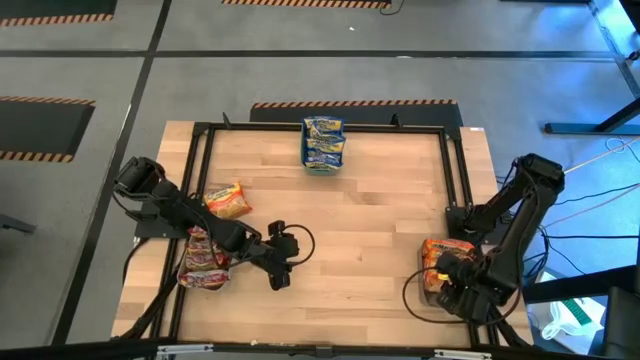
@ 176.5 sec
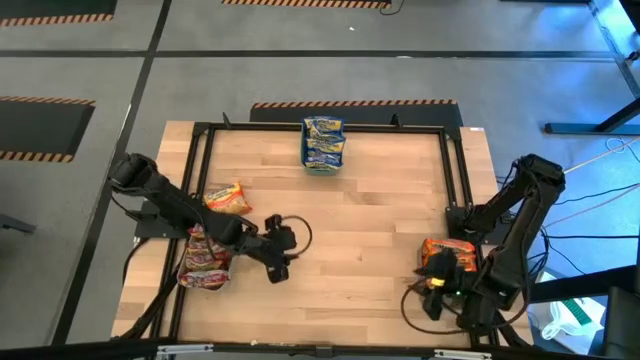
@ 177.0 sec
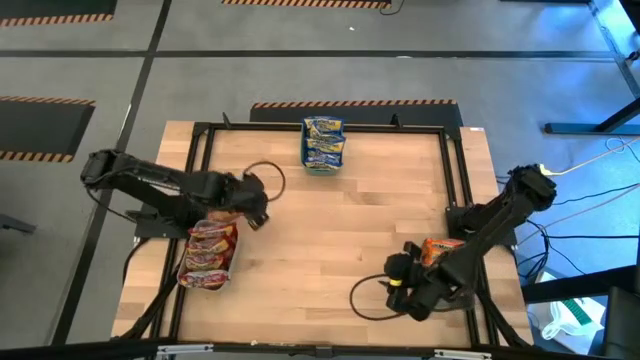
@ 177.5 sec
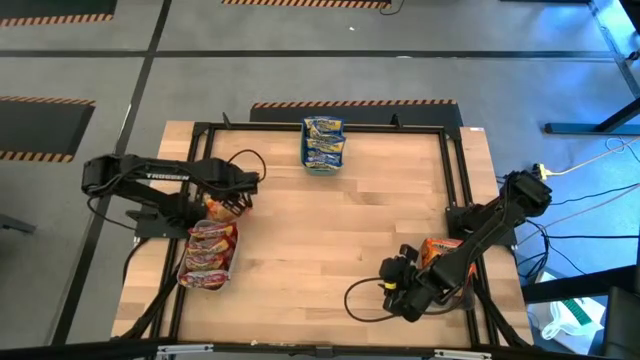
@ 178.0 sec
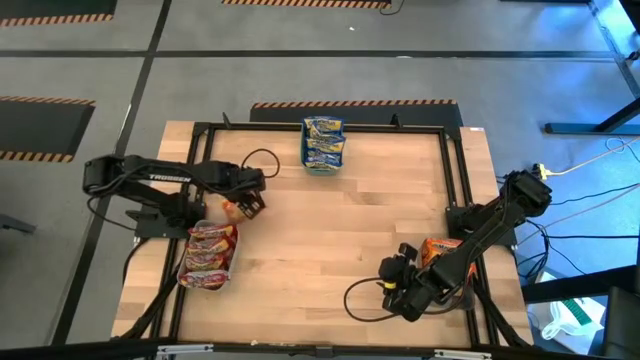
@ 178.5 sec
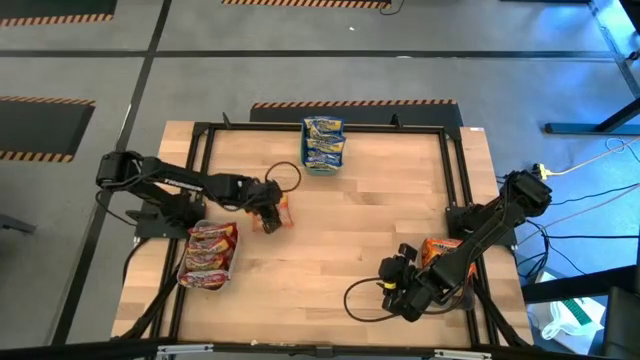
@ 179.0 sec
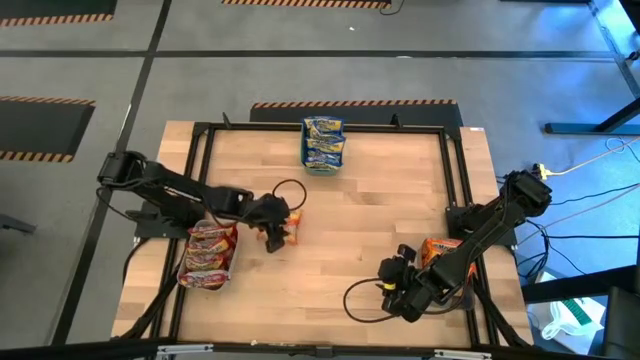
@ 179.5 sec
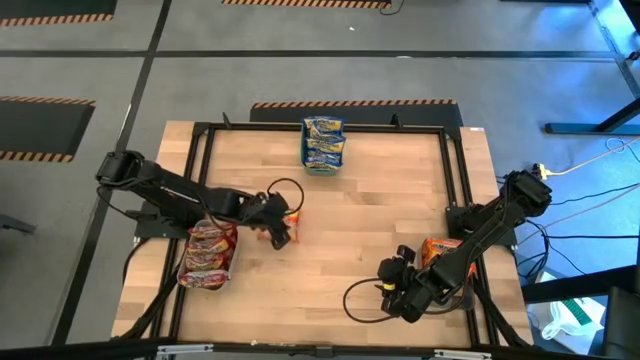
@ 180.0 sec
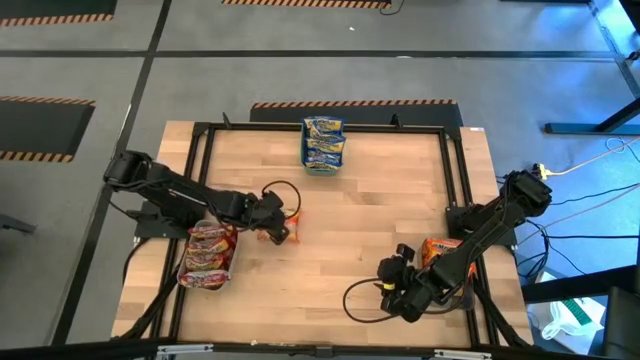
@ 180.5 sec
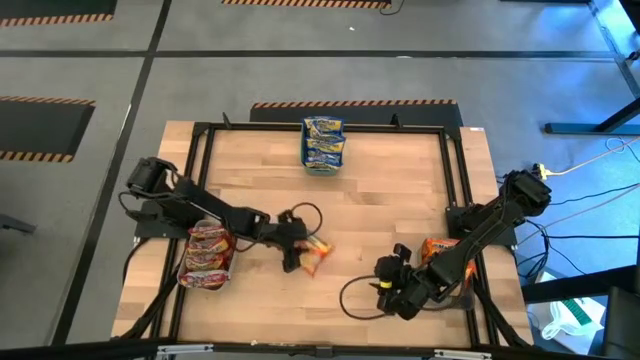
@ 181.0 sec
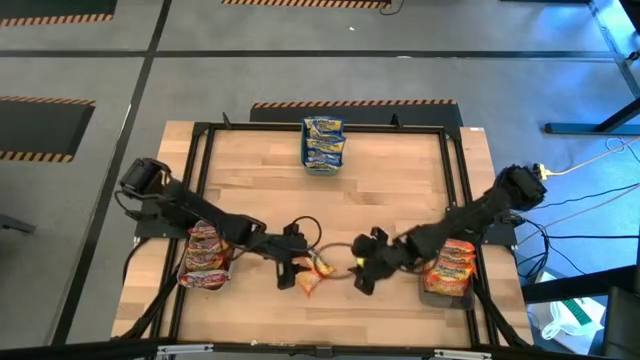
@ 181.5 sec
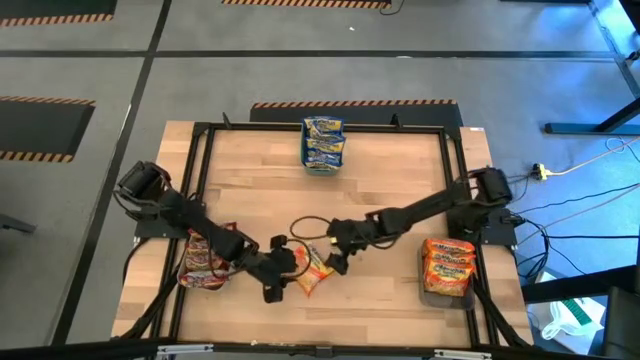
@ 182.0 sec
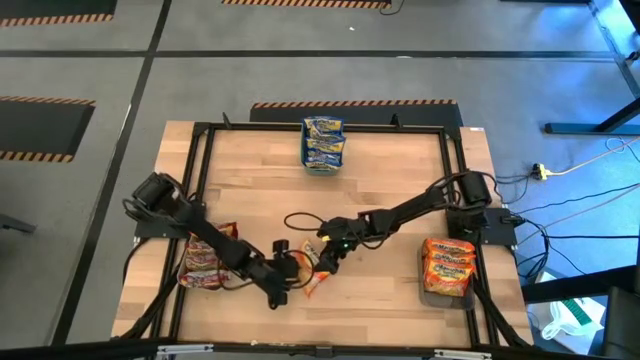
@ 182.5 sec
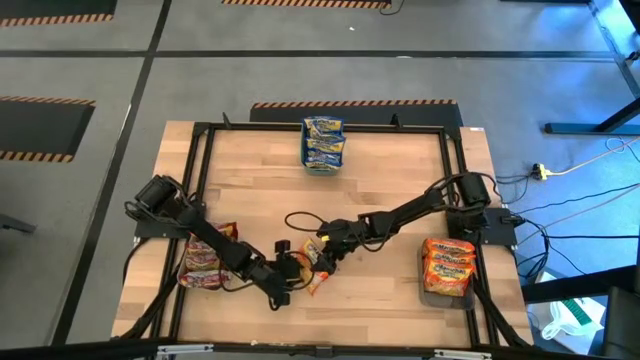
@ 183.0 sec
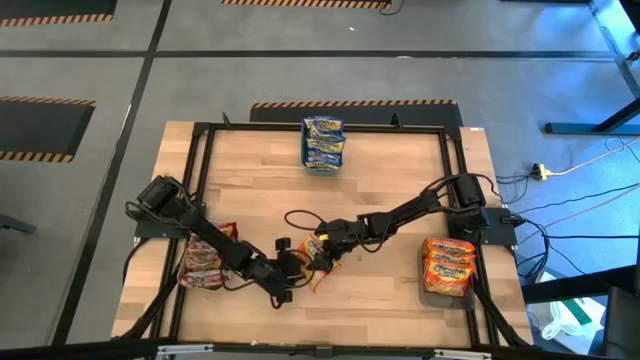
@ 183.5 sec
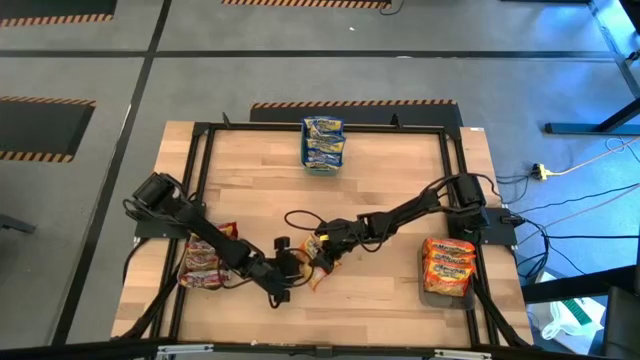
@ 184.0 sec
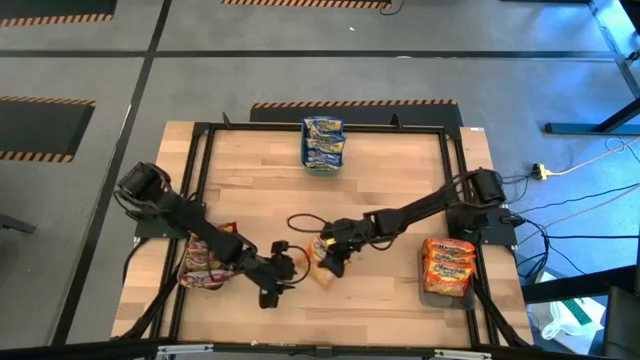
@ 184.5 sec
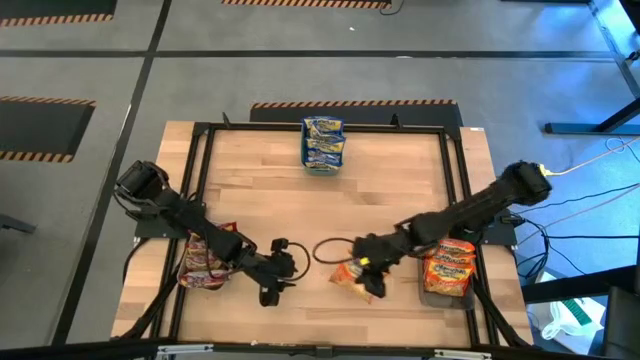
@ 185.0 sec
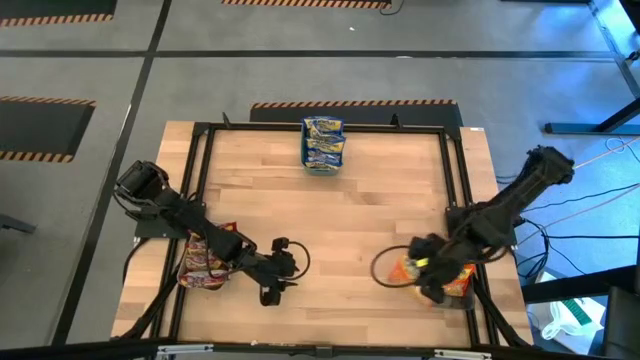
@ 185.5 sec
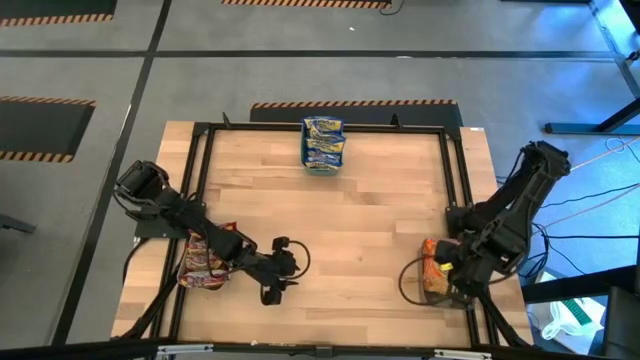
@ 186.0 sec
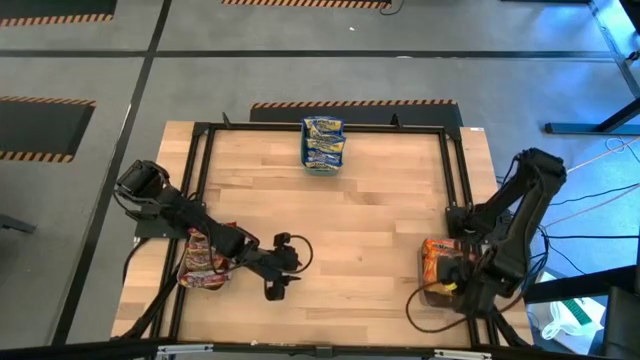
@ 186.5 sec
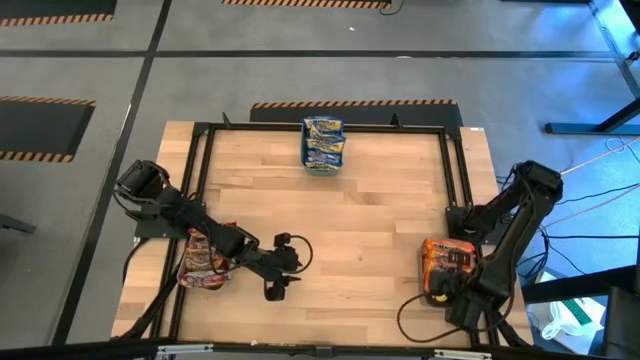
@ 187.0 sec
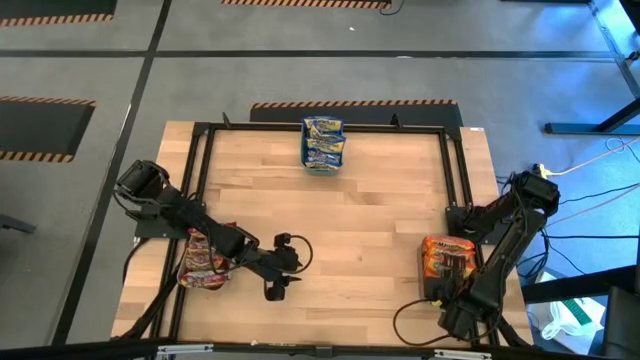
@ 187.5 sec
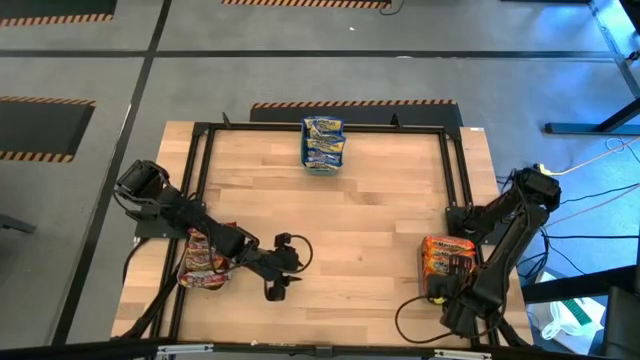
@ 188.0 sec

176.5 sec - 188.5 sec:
Task: Sort Maruchan noodles
Put the orange noodle pack into the black bin

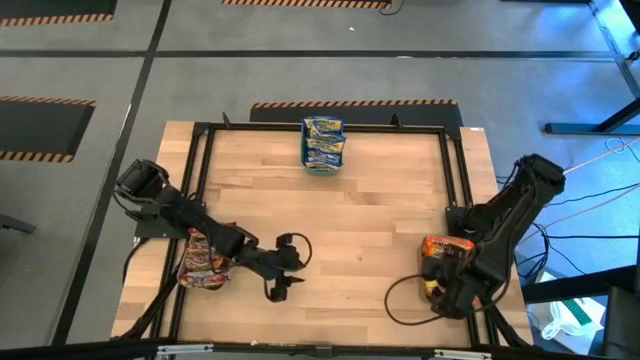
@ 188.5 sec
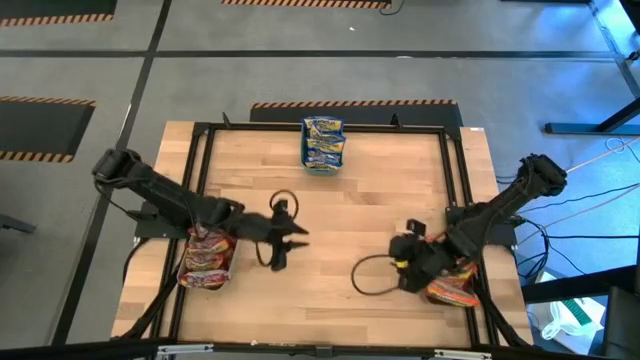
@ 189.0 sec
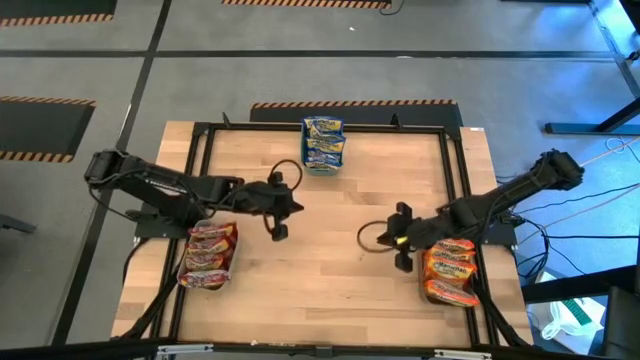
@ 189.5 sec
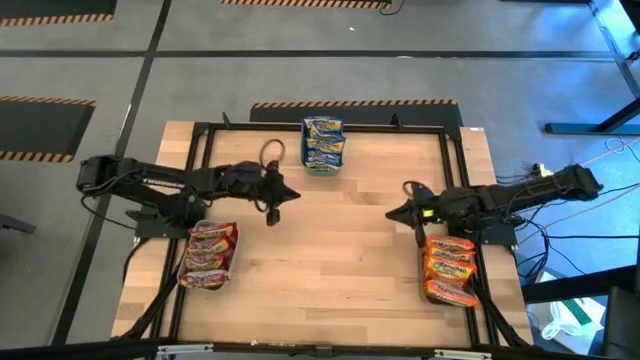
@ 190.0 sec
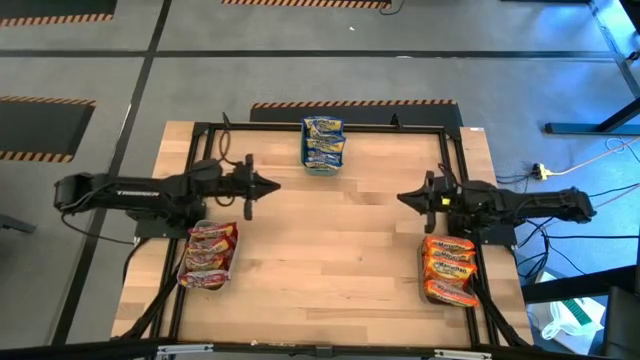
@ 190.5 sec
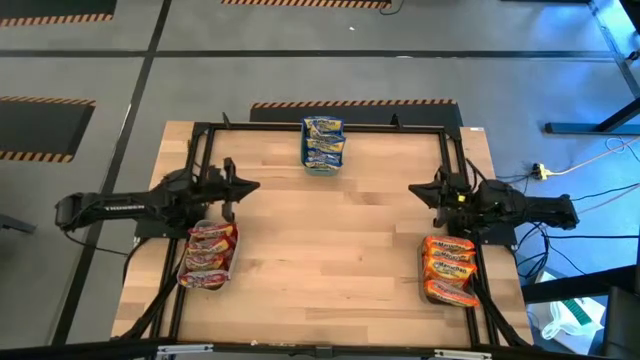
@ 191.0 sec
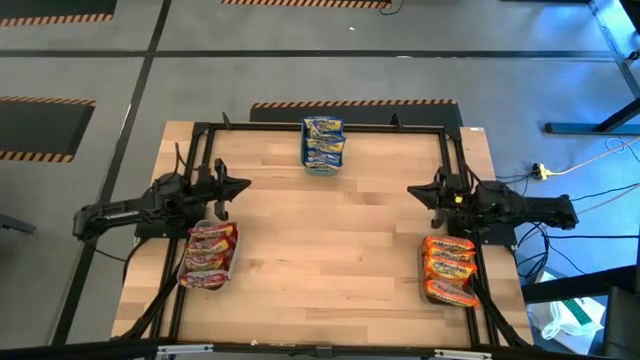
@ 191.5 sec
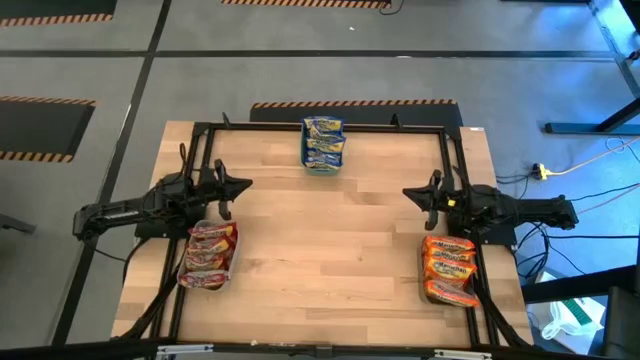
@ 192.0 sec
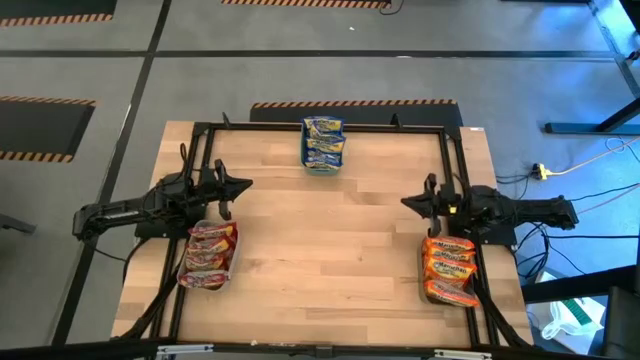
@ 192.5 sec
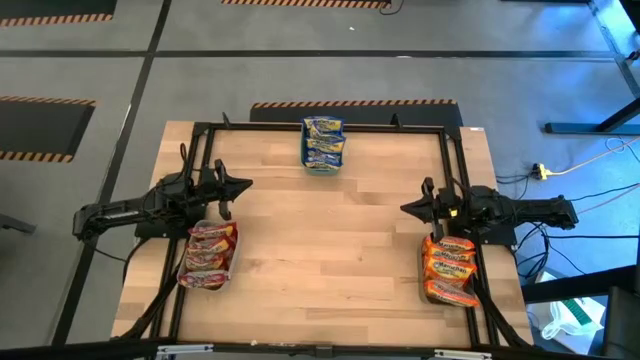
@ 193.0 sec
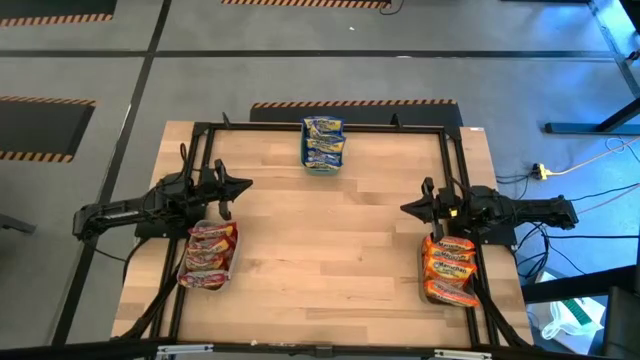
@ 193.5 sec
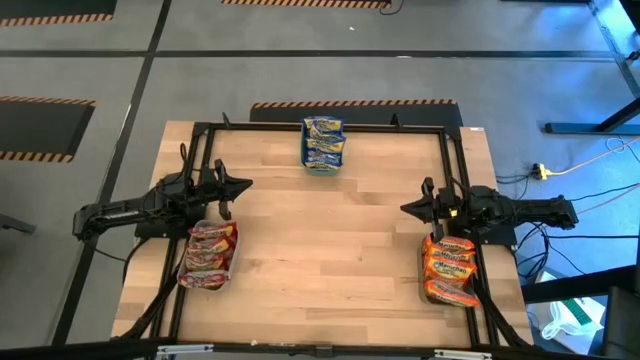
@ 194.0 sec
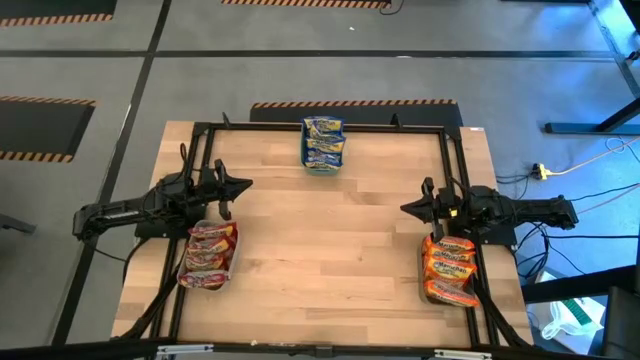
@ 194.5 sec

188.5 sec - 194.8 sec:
Return to Home Position

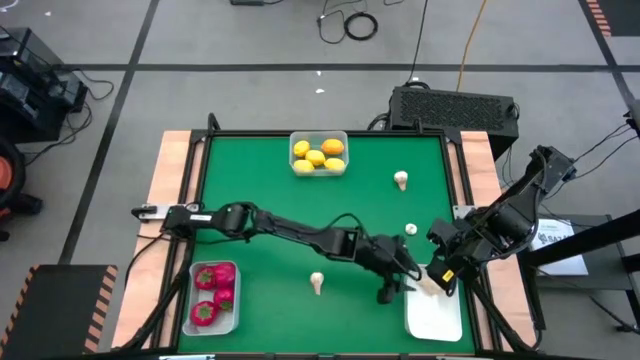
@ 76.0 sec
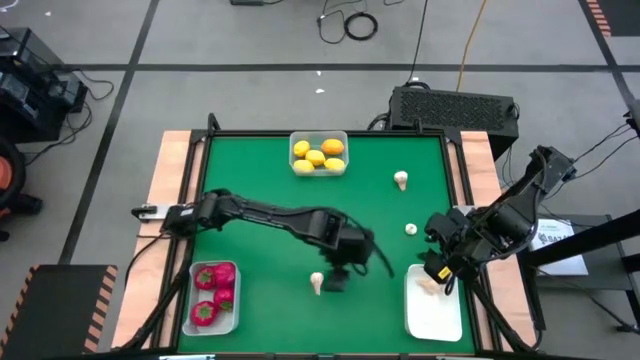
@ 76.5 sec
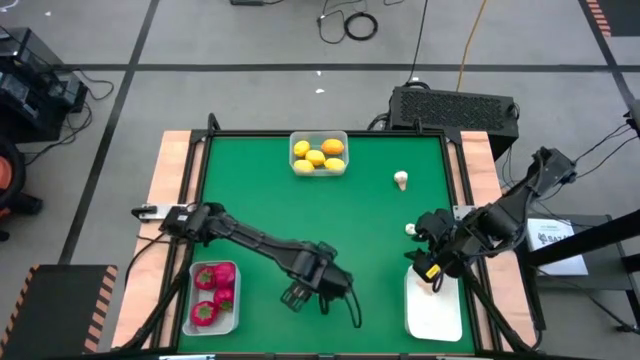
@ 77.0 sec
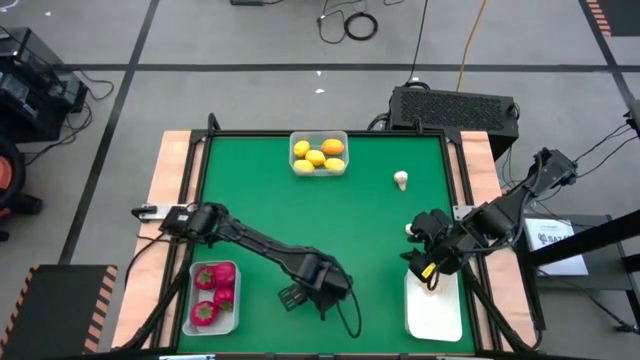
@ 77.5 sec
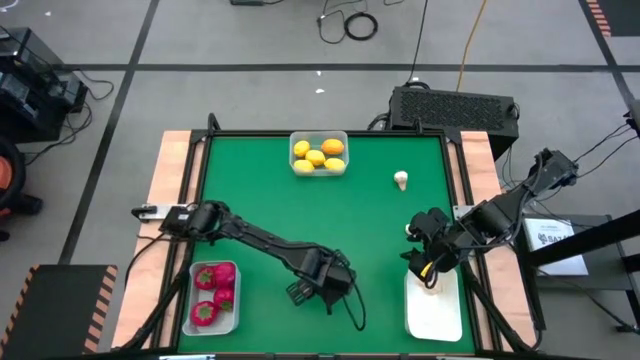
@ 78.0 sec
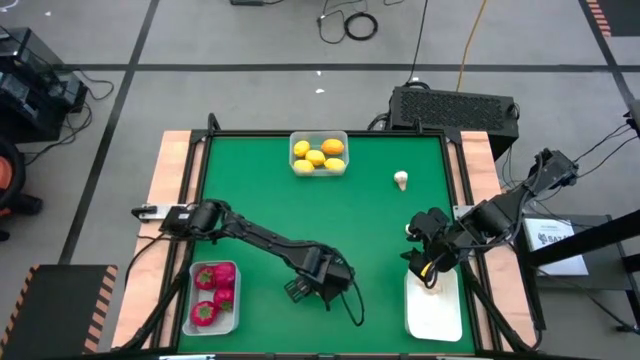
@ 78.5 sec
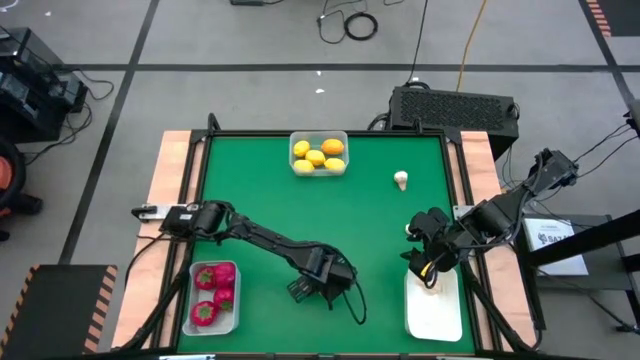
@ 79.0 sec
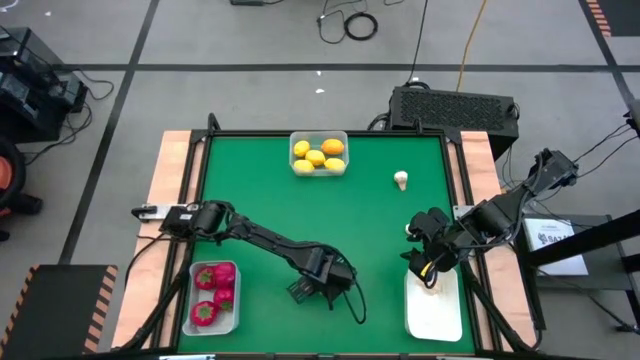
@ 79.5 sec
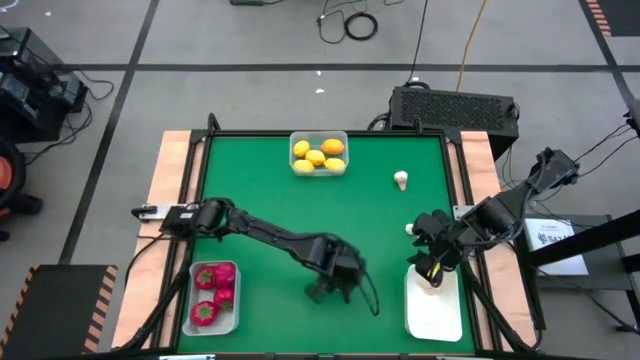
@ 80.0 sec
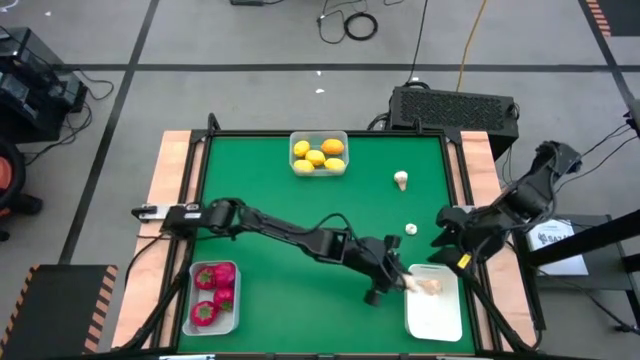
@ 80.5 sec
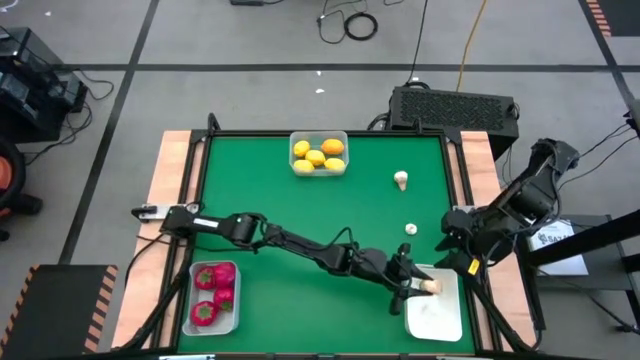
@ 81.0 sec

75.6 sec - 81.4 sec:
Task: Sort produce into baskets
Put the garlic into the white bin
